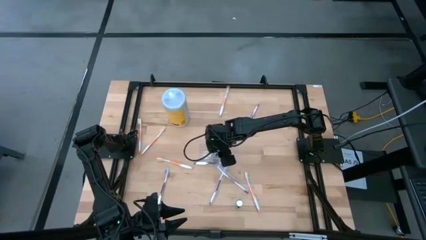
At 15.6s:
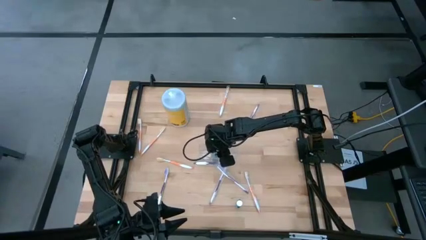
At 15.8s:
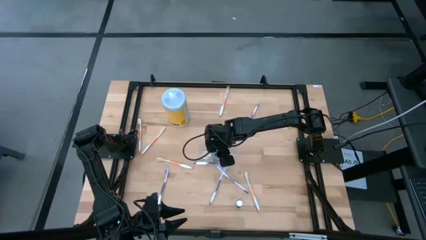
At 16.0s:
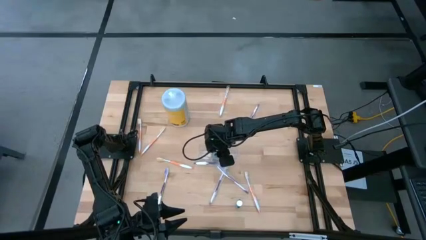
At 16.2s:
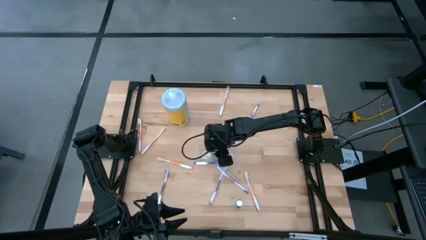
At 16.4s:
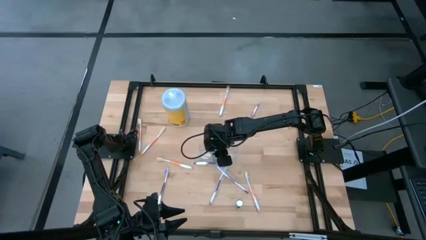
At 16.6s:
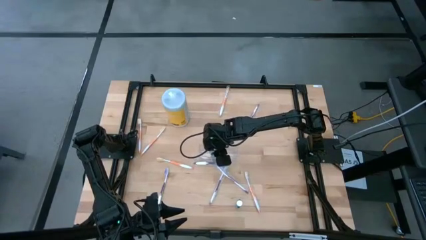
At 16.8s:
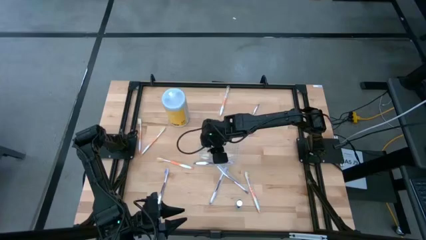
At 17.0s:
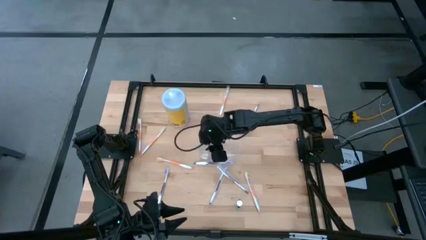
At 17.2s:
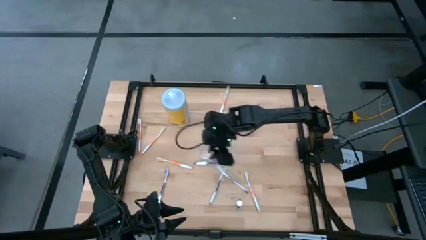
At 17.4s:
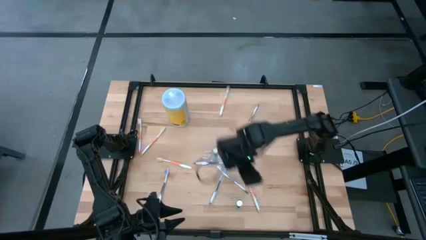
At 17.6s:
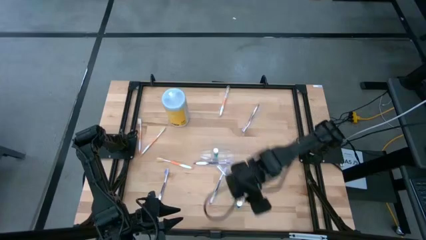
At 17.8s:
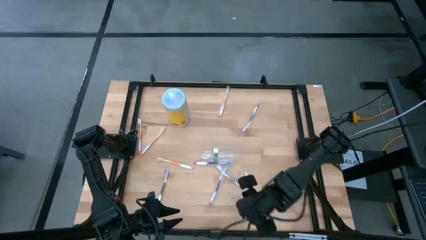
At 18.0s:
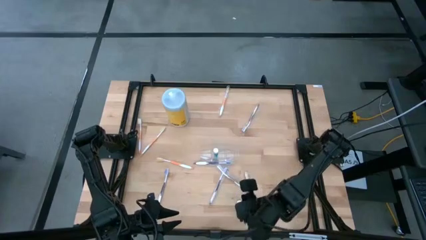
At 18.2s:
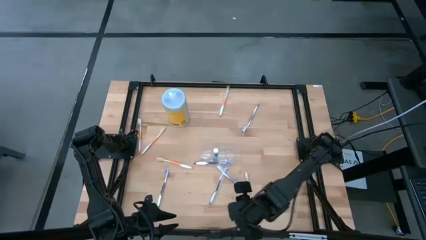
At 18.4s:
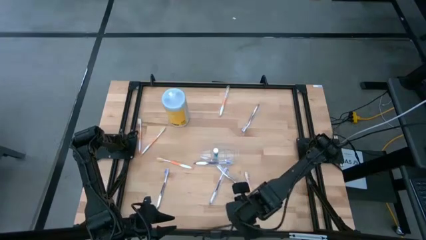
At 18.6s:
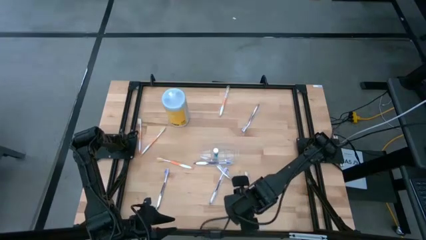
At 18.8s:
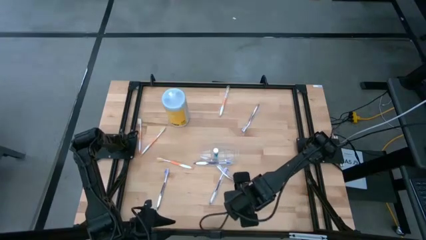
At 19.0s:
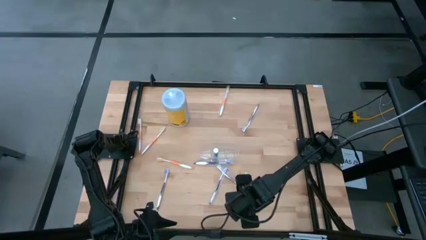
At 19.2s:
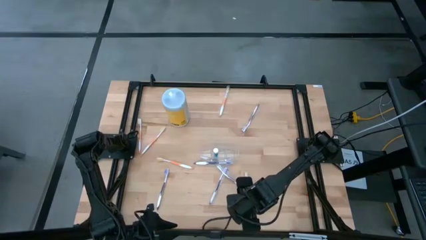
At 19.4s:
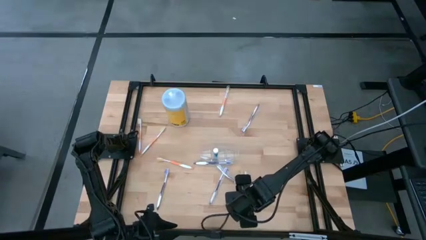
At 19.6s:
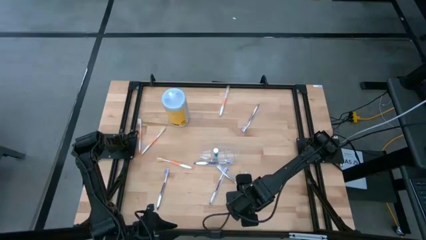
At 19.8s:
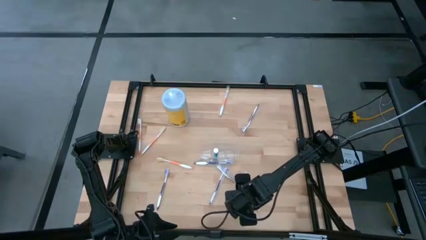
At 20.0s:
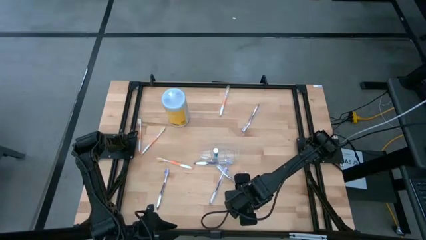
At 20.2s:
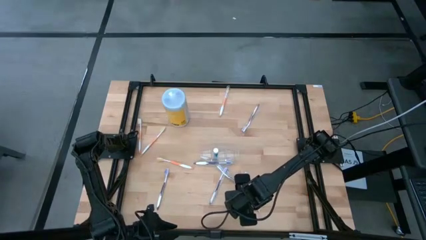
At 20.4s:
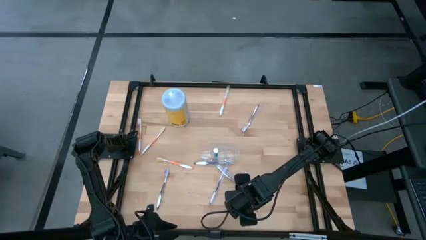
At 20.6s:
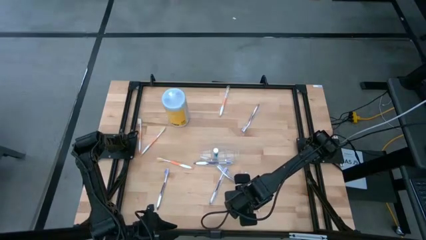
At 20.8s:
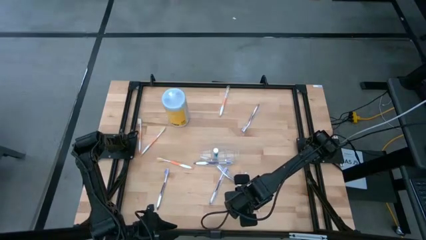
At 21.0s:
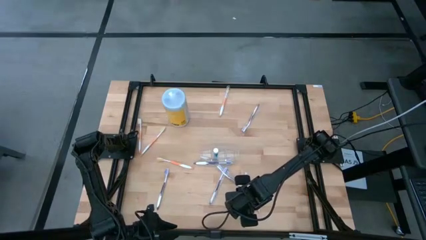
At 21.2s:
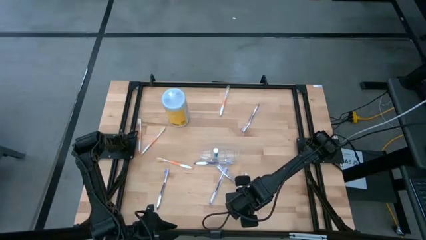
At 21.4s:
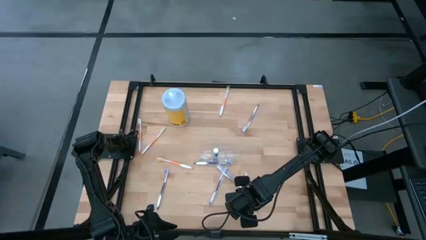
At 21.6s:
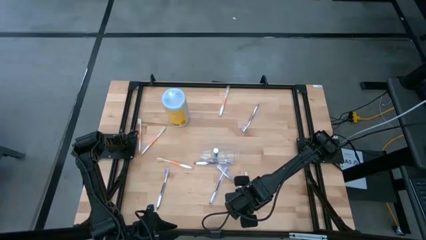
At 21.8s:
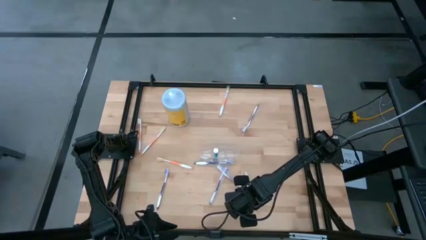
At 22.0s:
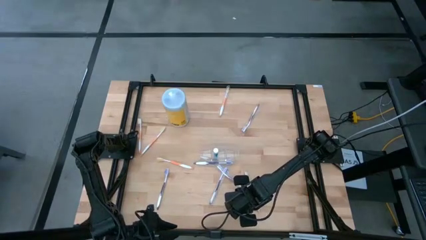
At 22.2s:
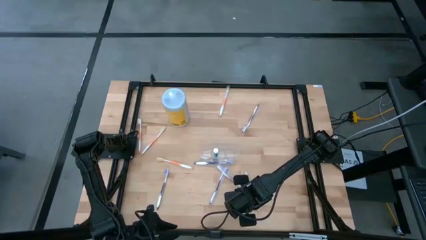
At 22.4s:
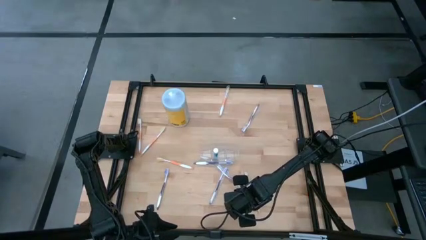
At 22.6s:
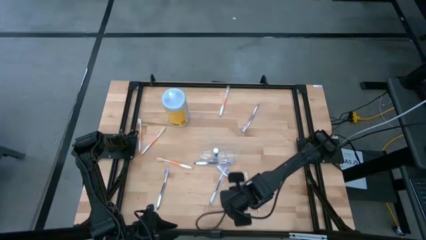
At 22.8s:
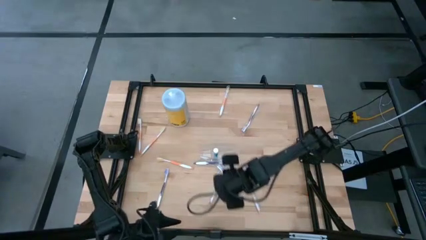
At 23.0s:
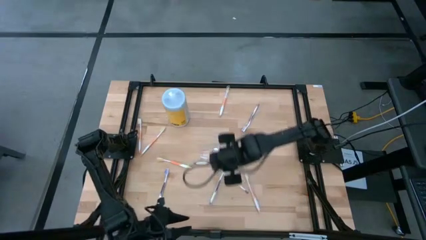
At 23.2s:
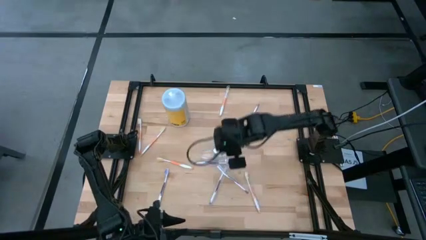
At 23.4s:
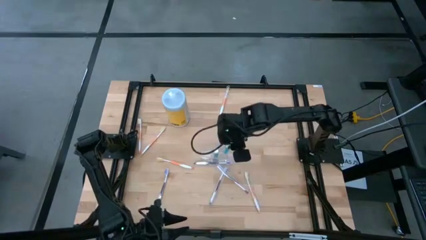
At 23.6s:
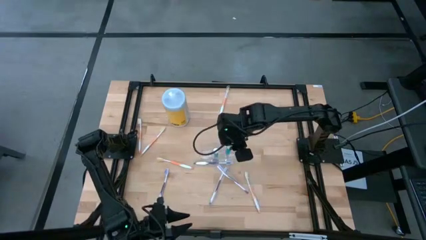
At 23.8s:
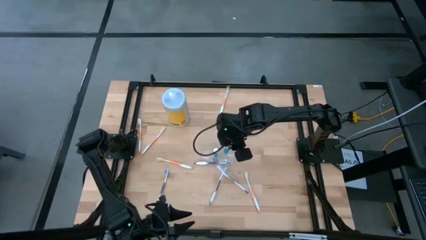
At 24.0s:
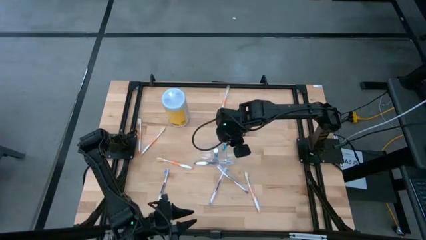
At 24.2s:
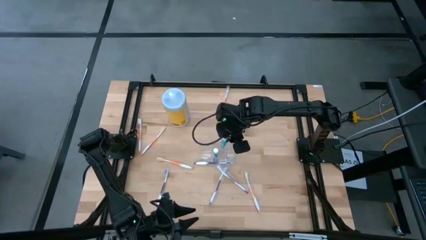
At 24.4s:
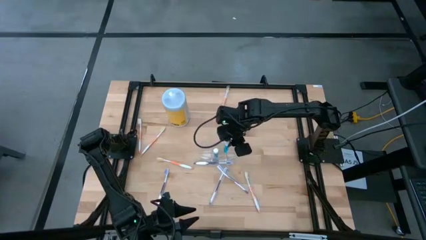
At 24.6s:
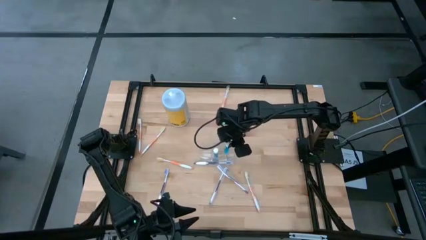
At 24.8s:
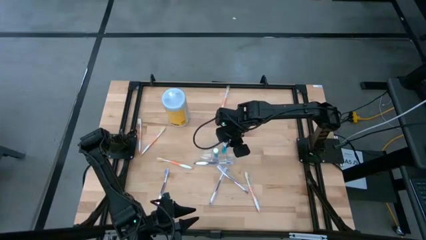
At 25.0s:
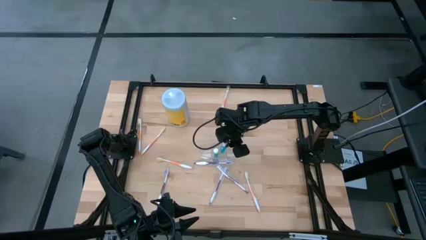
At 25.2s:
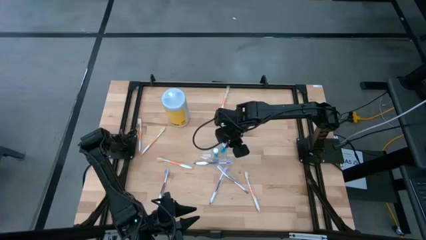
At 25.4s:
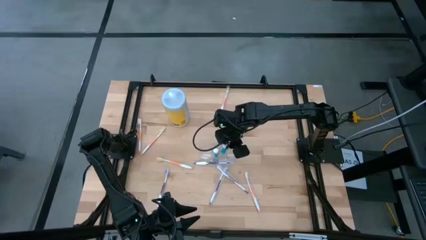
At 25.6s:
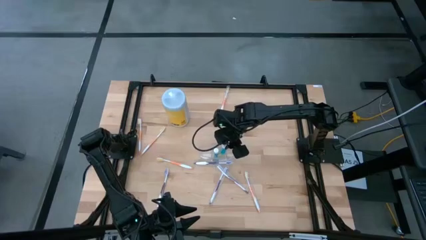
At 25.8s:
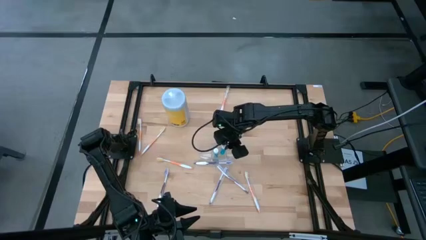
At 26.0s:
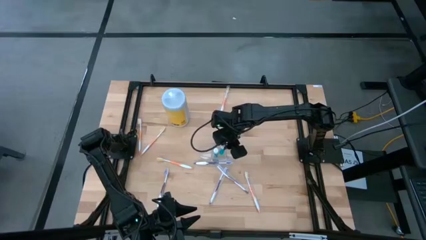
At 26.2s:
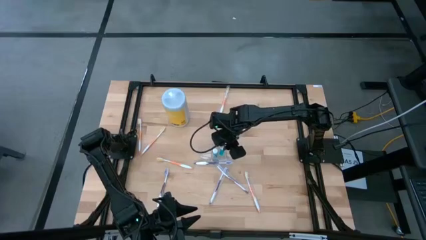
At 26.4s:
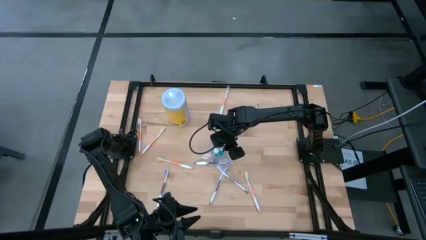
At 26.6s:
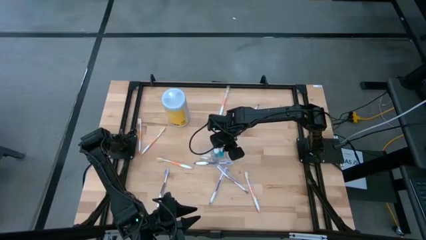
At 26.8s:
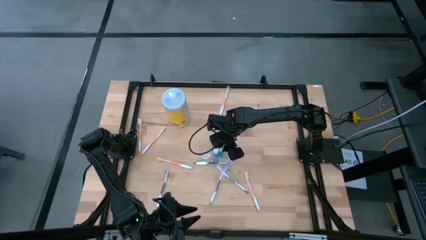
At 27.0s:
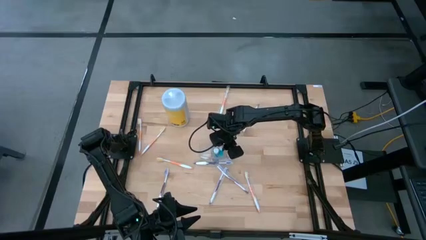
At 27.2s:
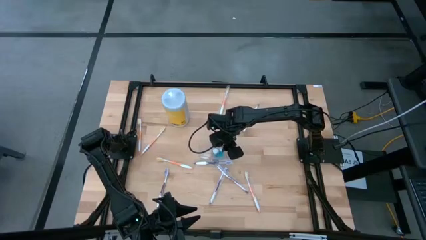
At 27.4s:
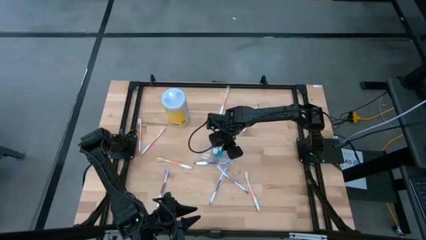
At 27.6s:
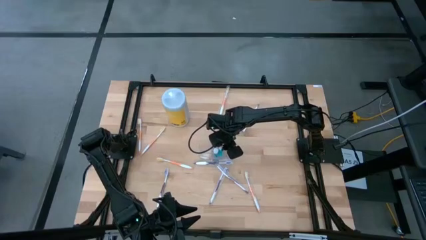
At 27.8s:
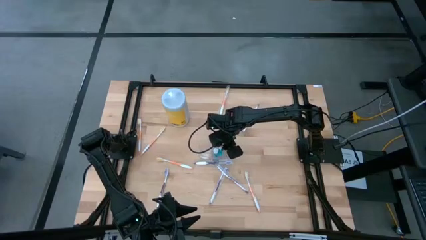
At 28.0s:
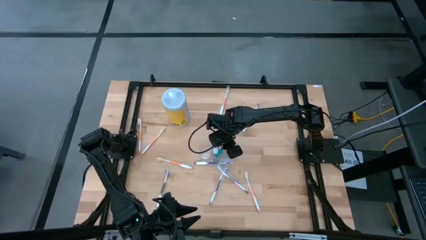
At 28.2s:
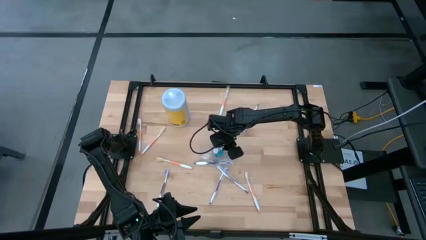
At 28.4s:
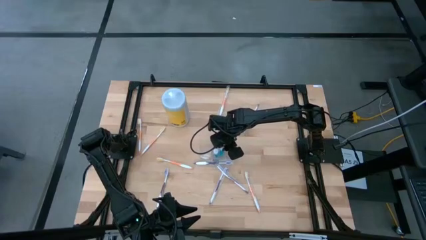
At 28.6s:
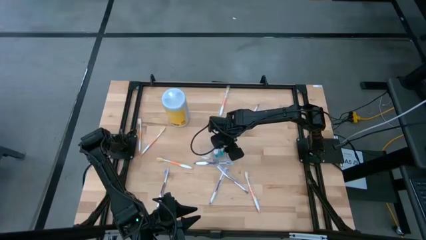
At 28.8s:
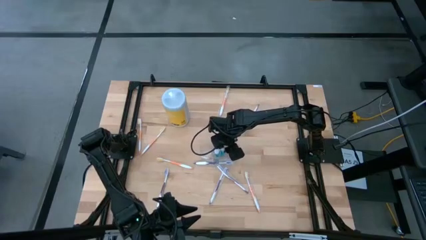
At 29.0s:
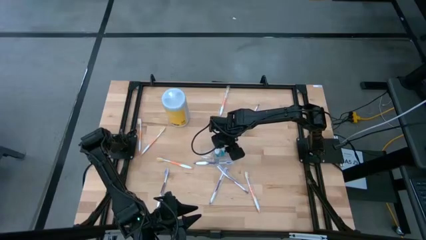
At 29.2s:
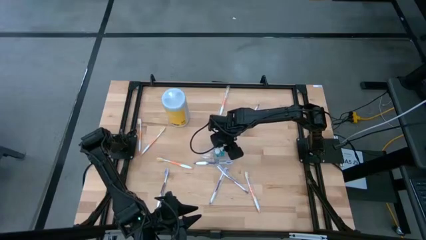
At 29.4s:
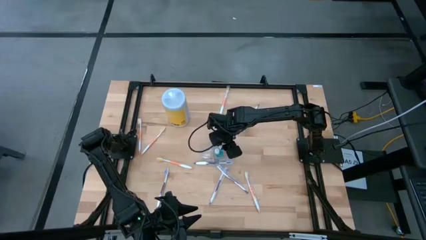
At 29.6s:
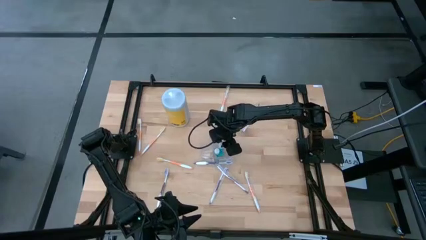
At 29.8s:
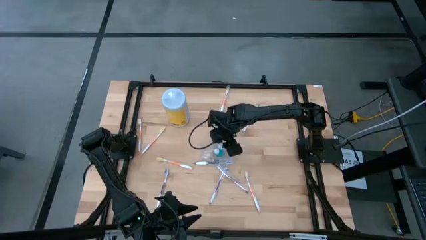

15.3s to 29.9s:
Task: Pick & Place toothbrushing station
Put the blue mouthwash into the middle compartment of the transparent organizer

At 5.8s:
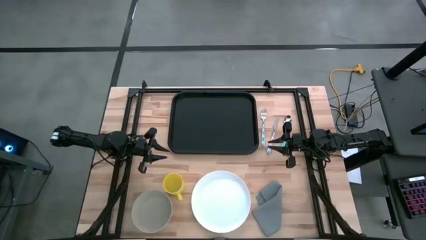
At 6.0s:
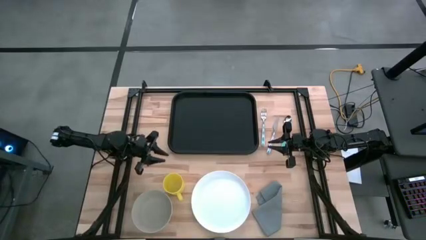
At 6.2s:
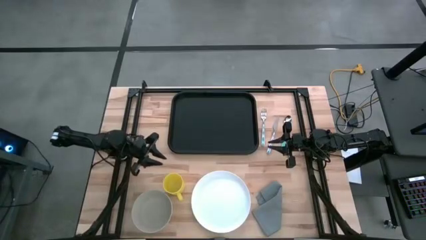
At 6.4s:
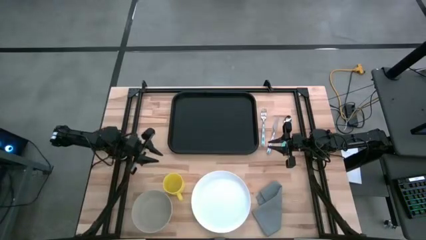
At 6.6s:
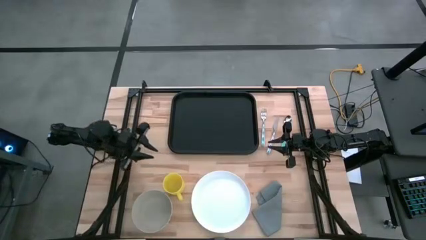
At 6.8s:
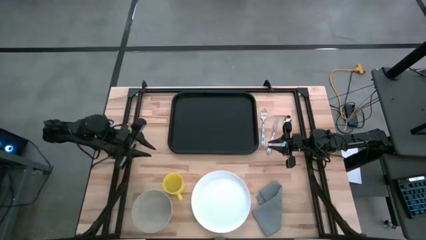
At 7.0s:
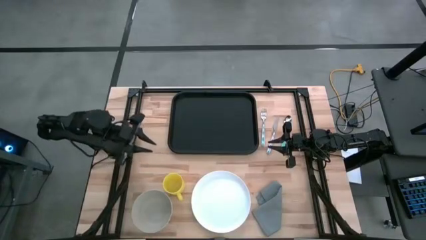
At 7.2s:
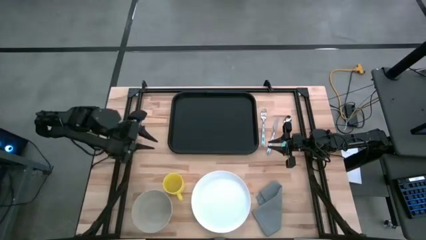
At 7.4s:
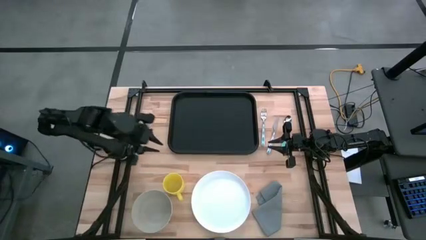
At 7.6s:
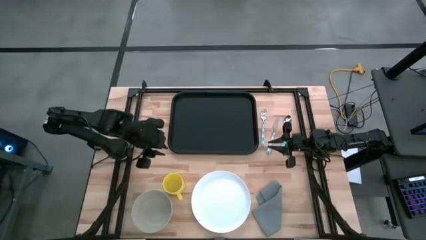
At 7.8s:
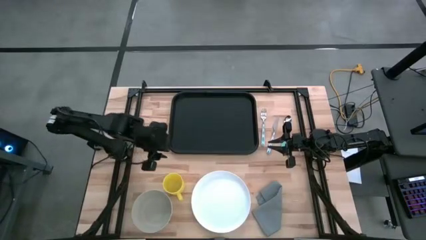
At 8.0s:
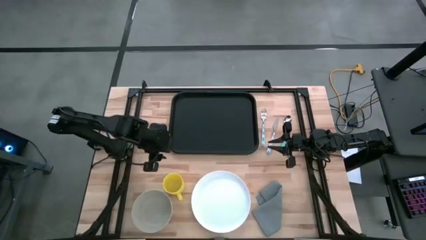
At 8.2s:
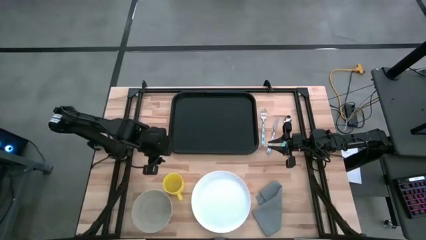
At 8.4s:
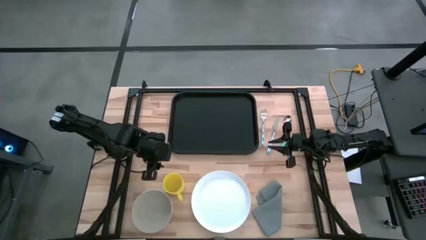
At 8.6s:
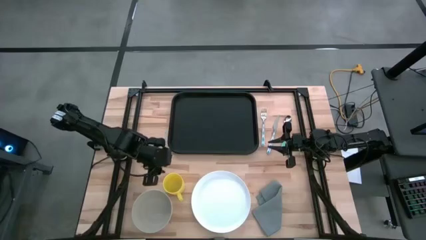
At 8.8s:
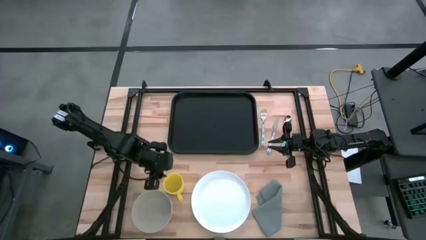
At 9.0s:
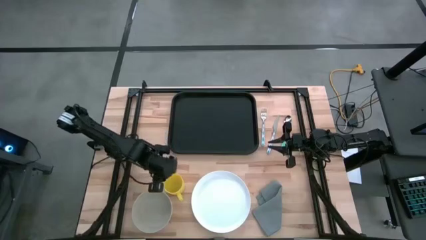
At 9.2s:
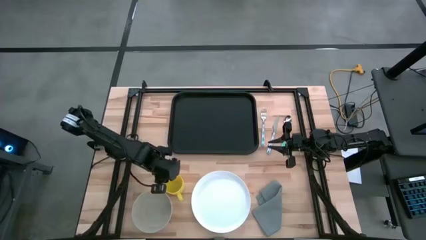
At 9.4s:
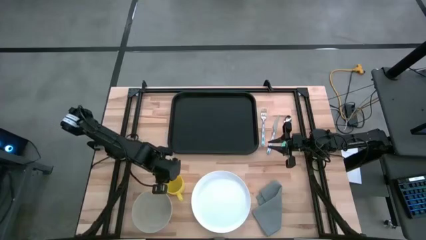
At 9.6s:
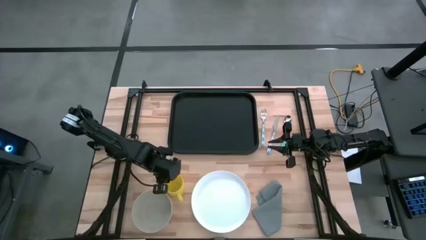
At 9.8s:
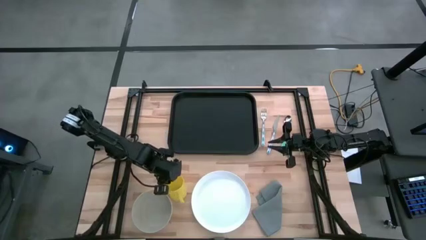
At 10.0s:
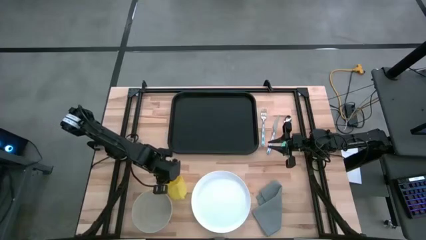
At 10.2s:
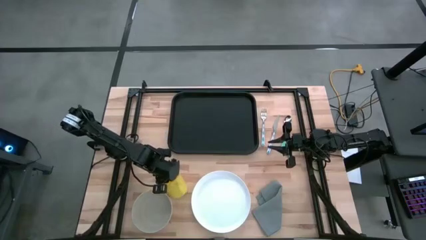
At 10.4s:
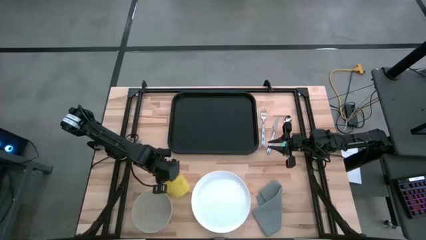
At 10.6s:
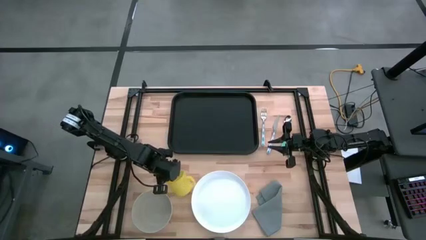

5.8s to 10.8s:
Task: Set up tray
Put the yellow cup on the black tray
